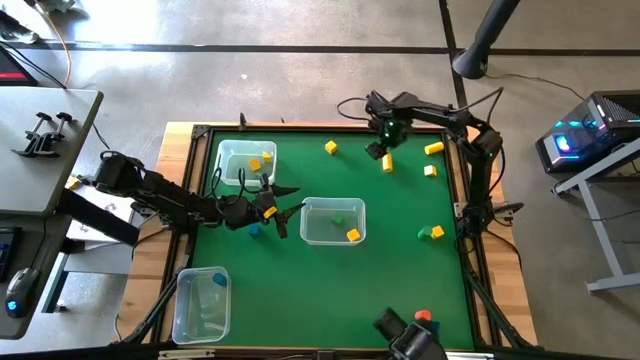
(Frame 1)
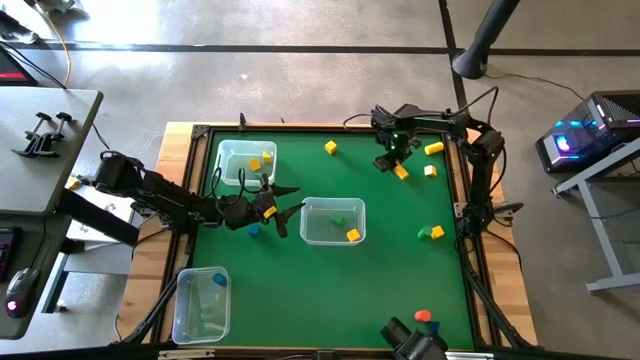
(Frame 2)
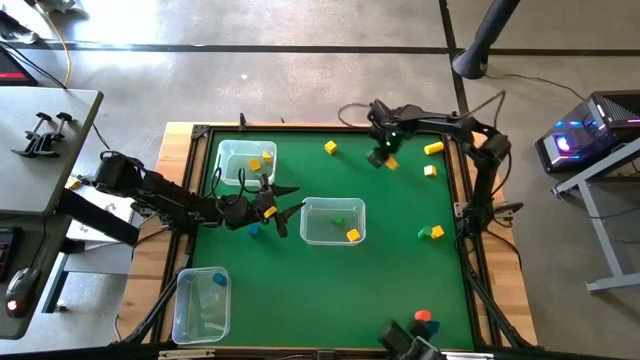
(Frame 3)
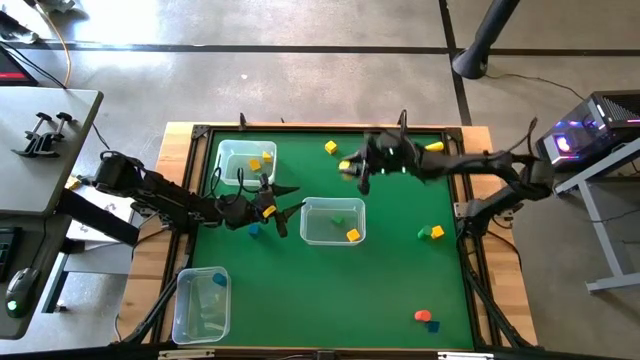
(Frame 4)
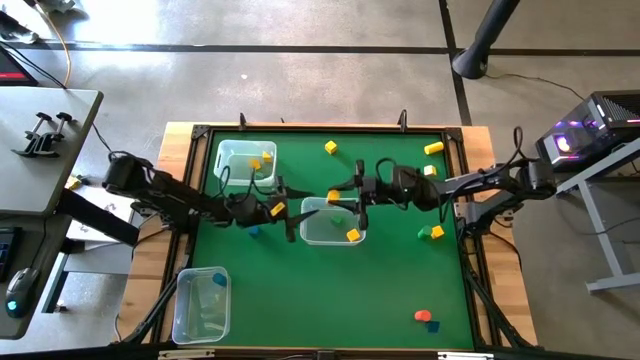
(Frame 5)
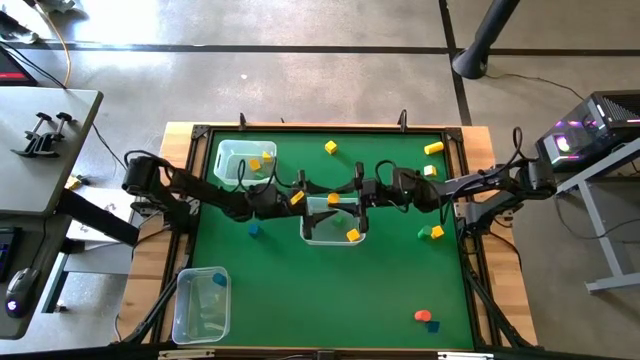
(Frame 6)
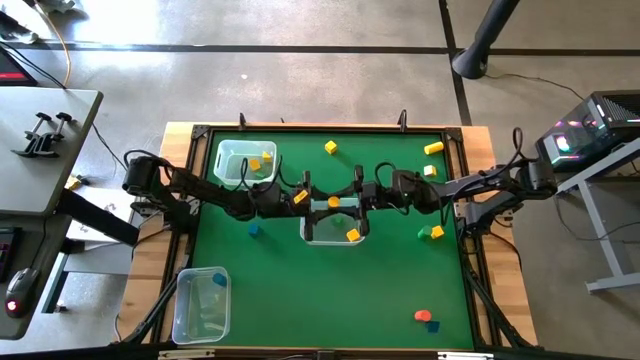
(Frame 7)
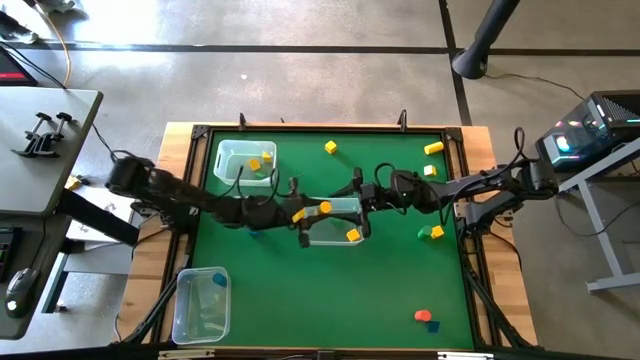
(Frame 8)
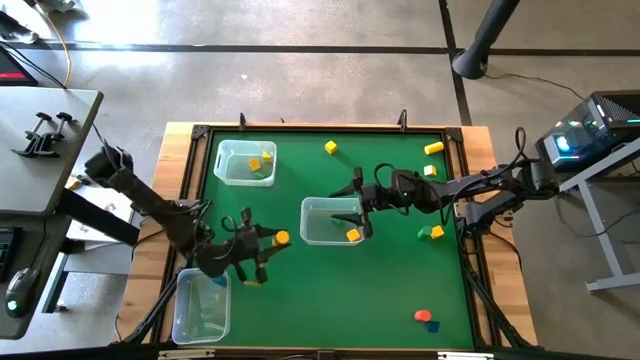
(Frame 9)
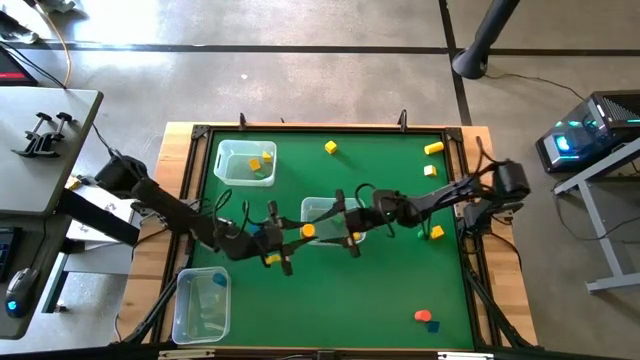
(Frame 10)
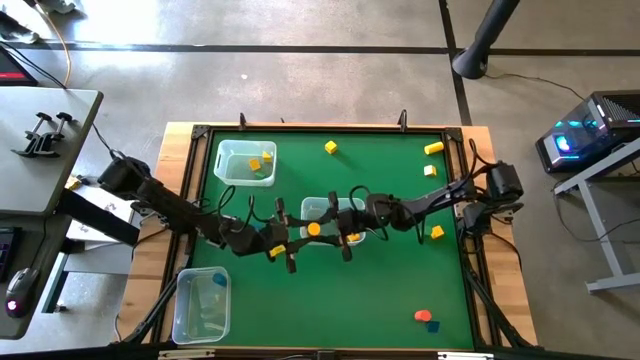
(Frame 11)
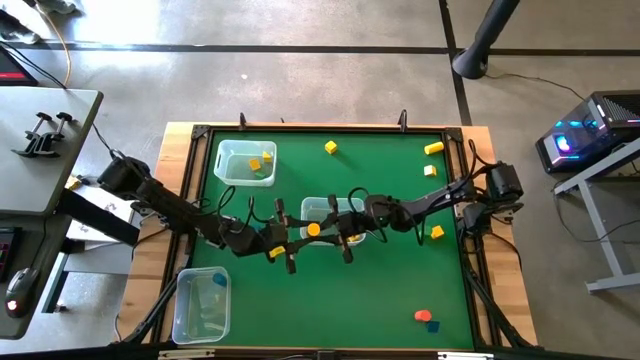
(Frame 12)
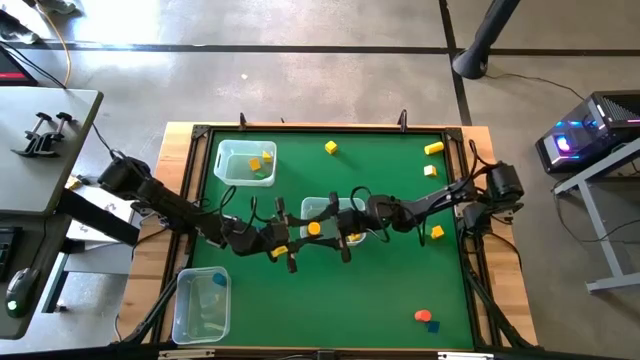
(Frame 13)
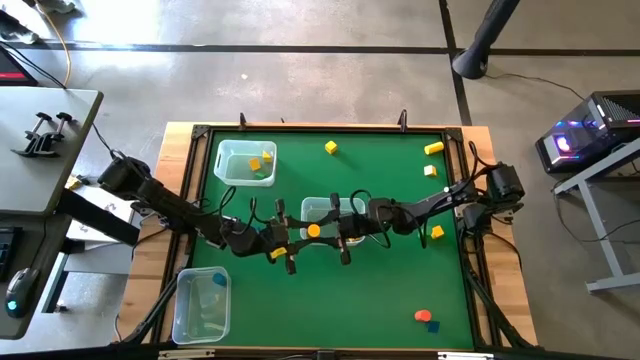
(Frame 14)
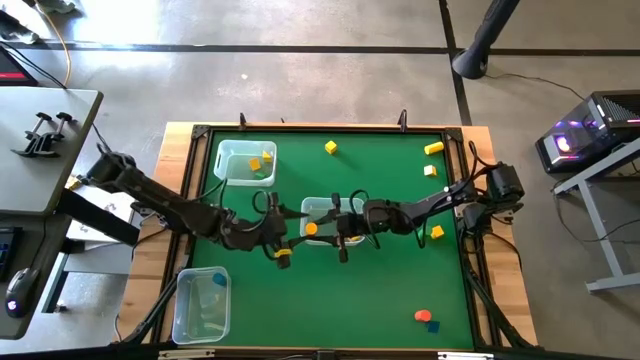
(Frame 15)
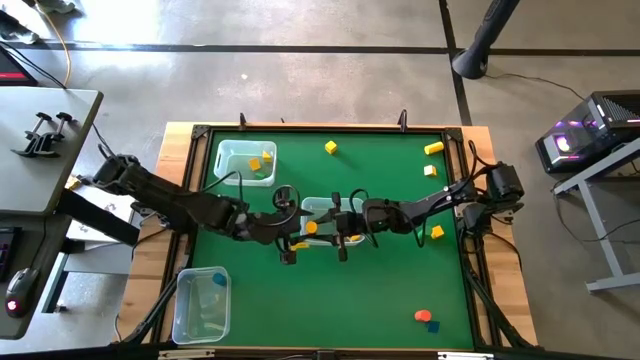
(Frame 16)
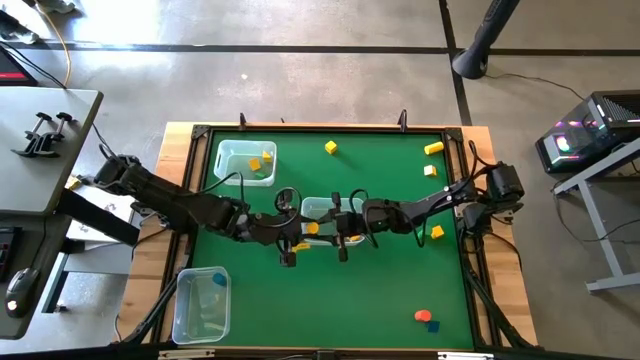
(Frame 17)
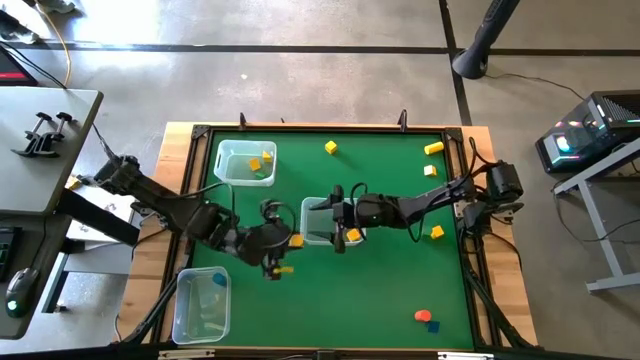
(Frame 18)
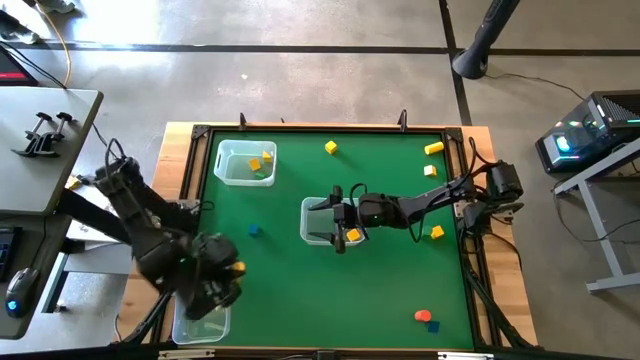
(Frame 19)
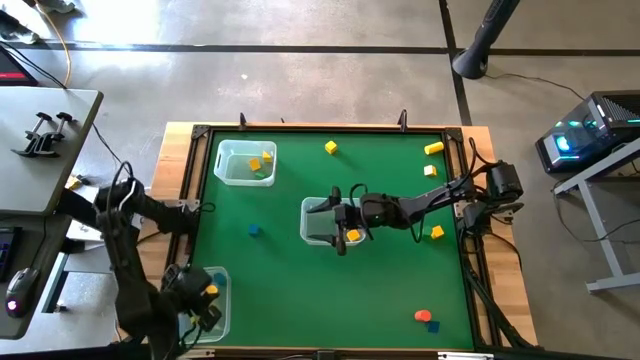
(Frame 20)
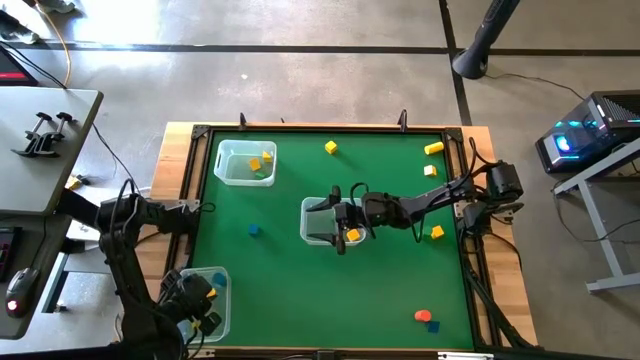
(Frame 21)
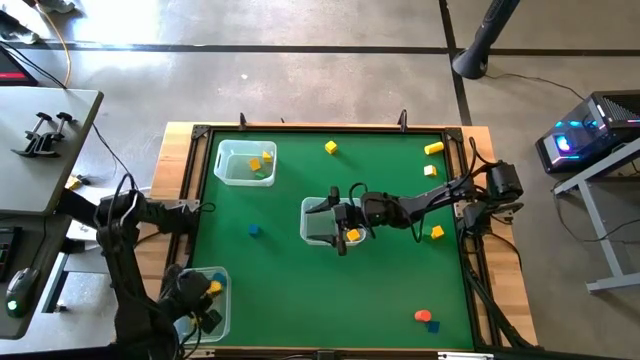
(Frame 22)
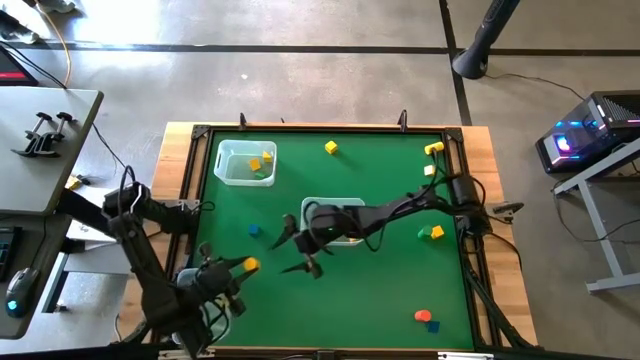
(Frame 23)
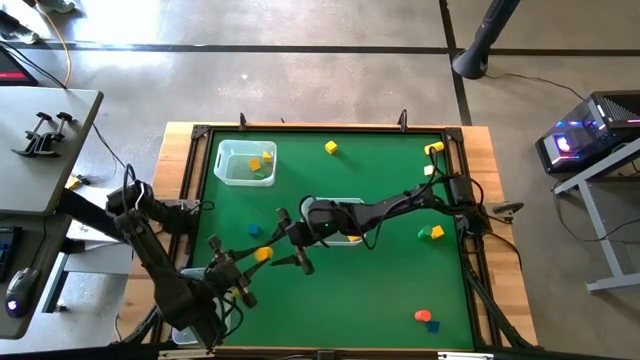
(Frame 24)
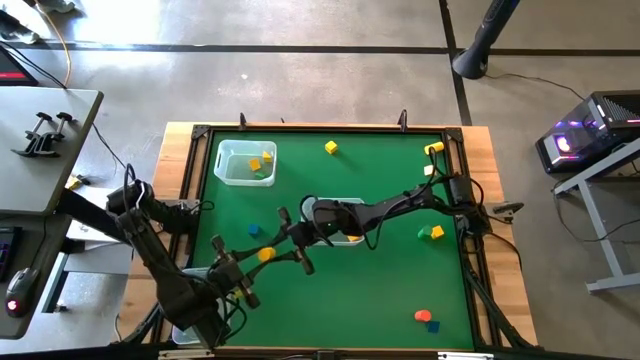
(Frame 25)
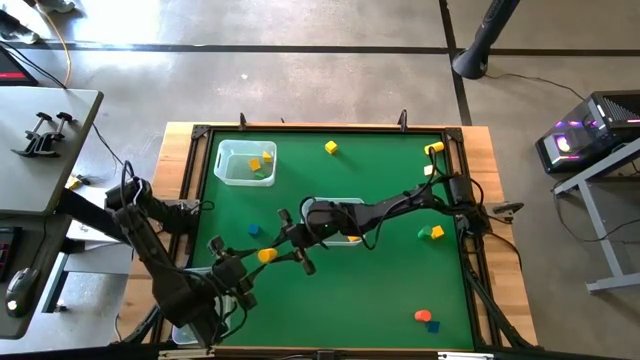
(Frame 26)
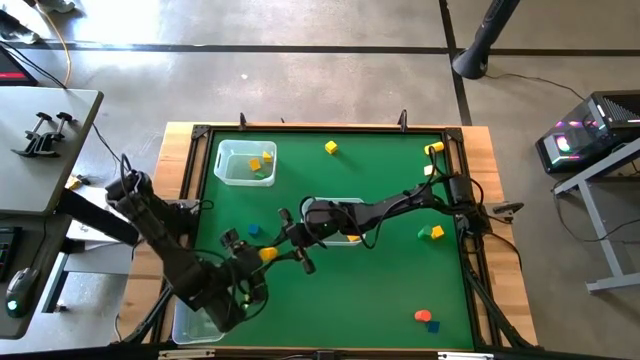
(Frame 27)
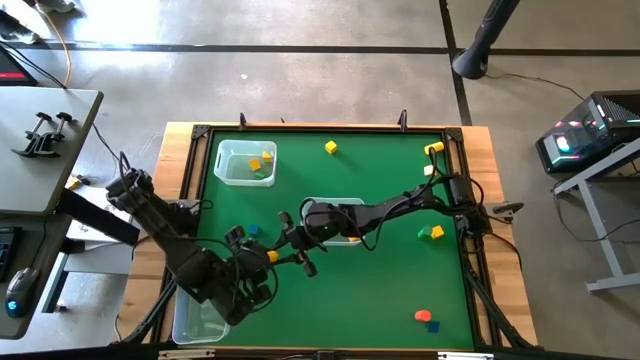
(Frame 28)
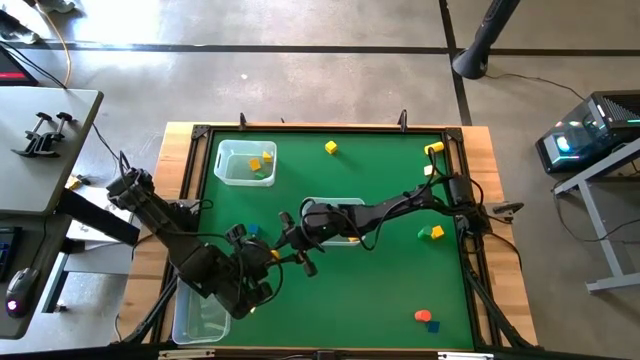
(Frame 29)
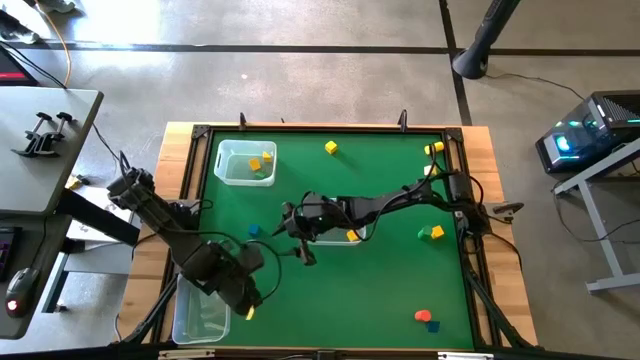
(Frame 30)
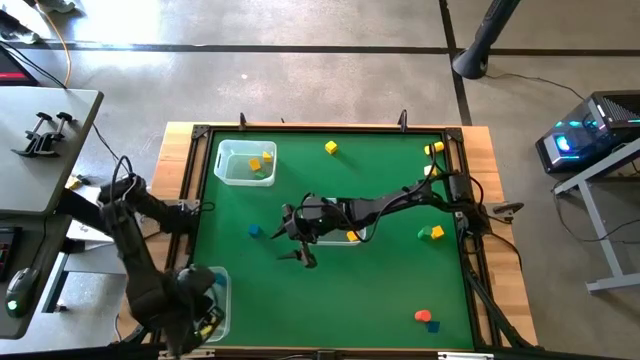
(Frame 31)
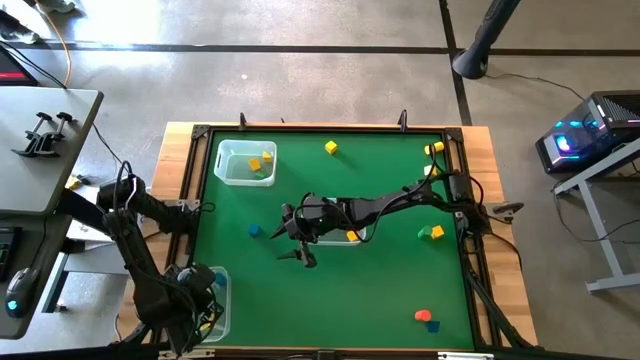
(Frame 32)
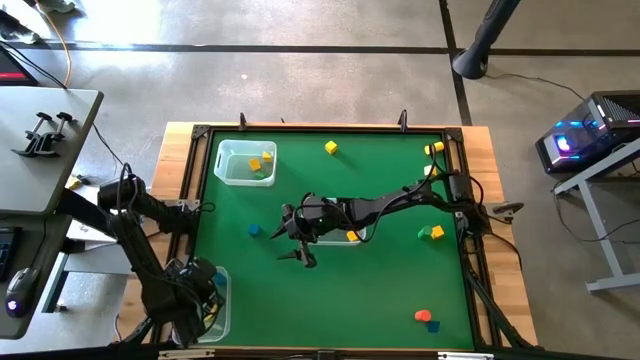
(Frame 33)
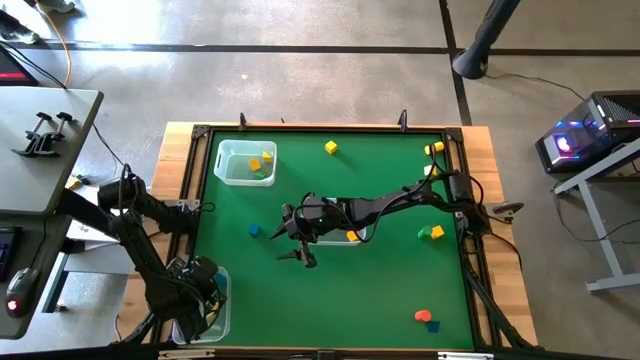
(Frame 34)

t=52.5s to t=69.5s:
Task: Sort blocks by size
Put the yellow cylindrical block into the bottom left transparent bin

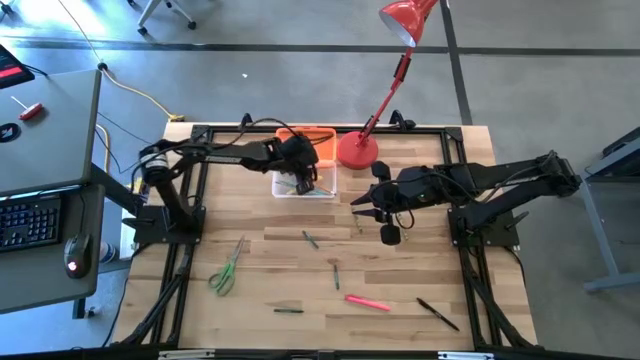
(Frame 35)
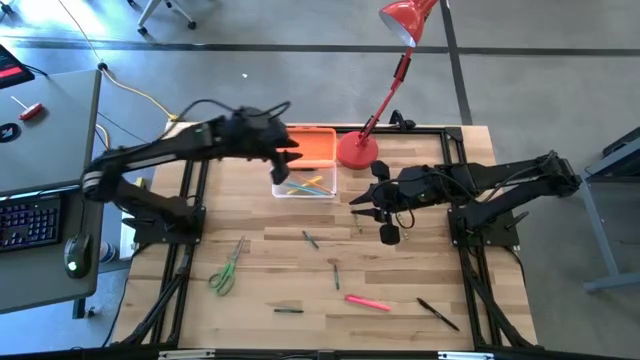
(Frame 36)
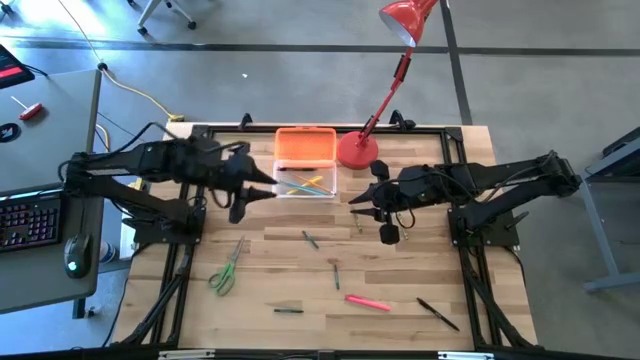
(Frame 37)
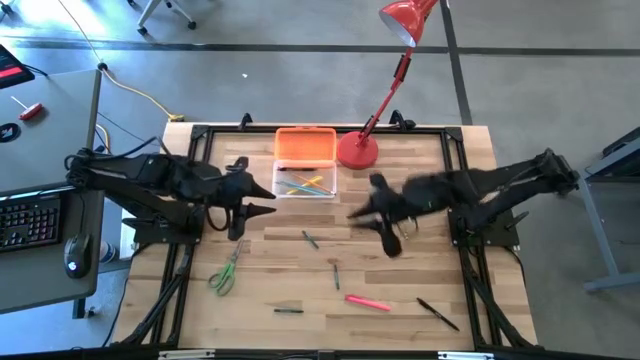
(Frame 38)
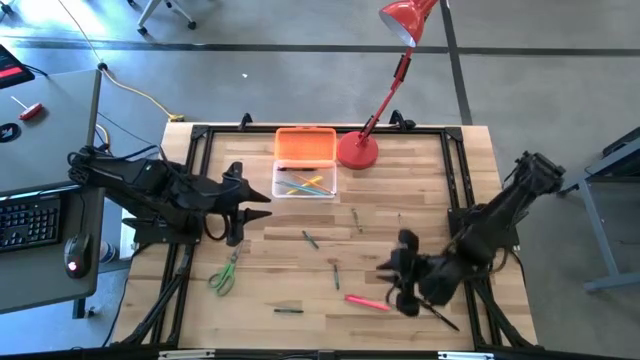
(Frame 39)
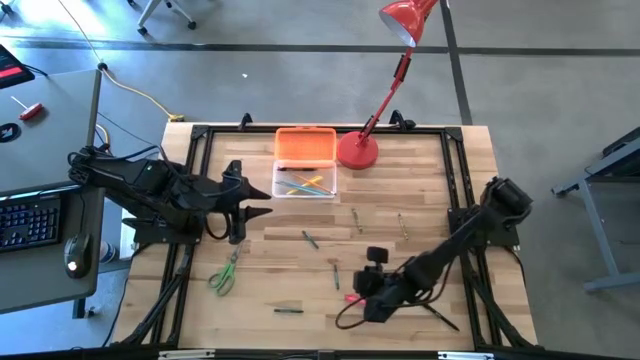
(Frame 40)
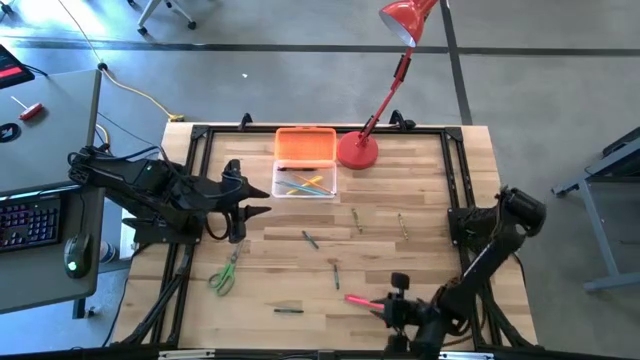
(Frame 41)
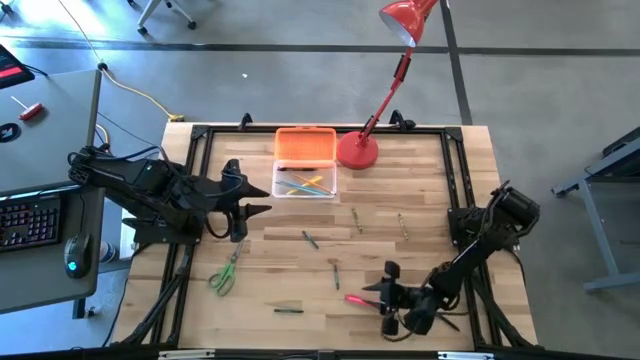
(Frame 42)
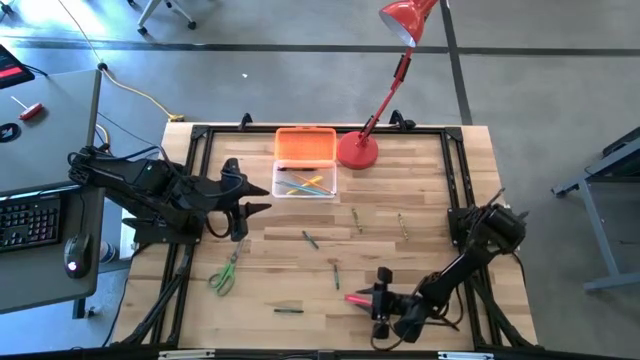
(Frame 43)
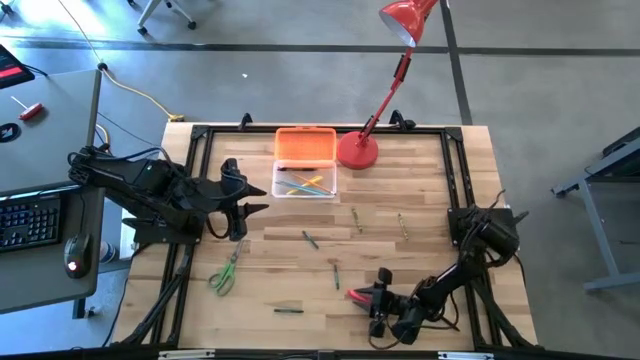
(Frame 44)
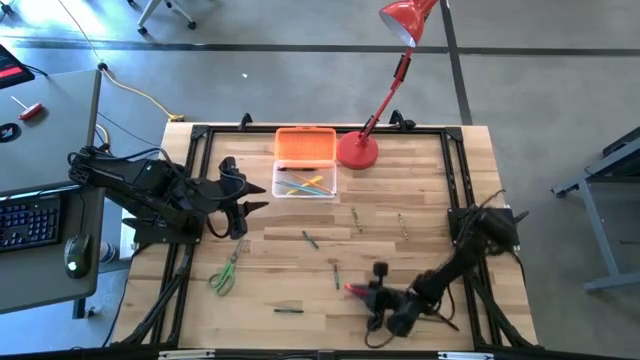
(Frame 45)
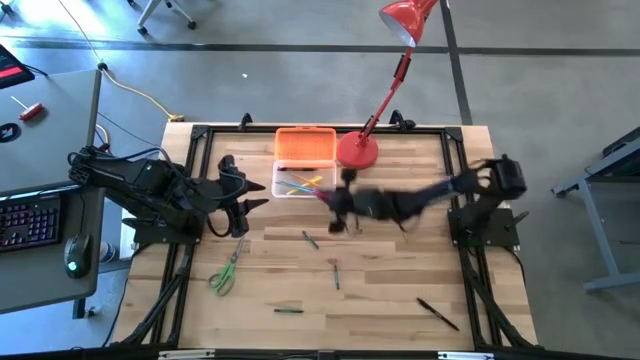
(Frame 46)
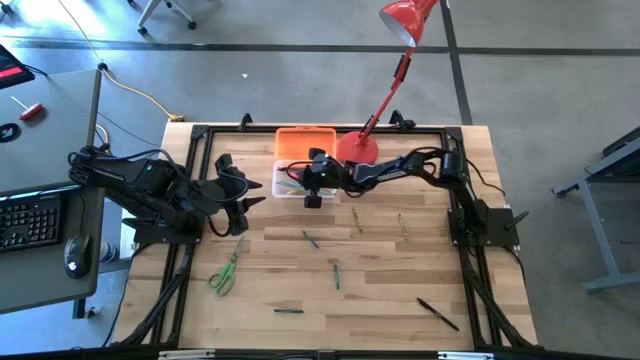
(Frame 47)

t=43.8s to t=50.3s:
Task: Pick & place school supplies into a supply box
Put the pink pen into the orange supply box
